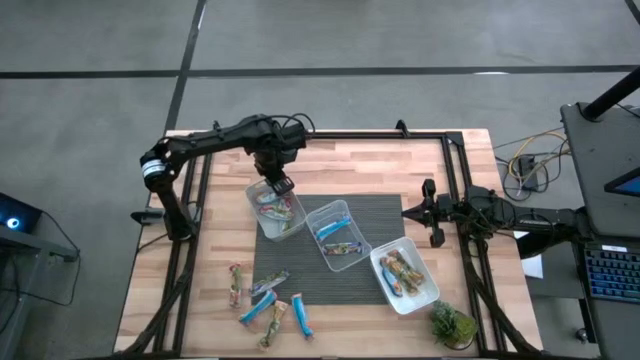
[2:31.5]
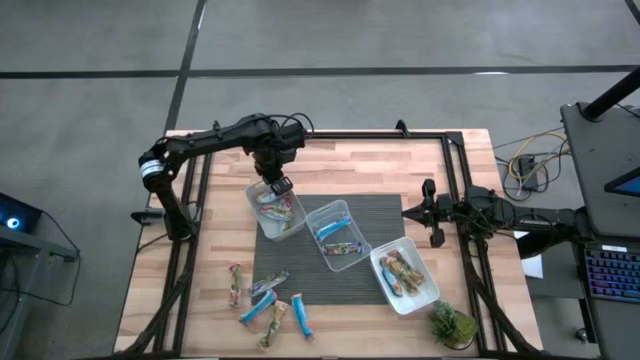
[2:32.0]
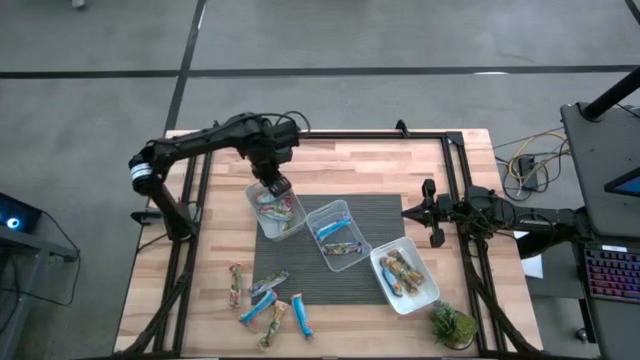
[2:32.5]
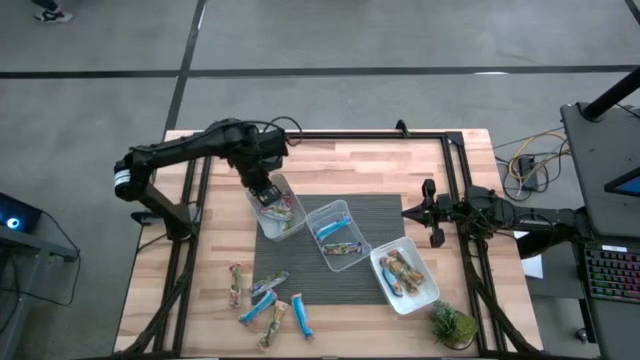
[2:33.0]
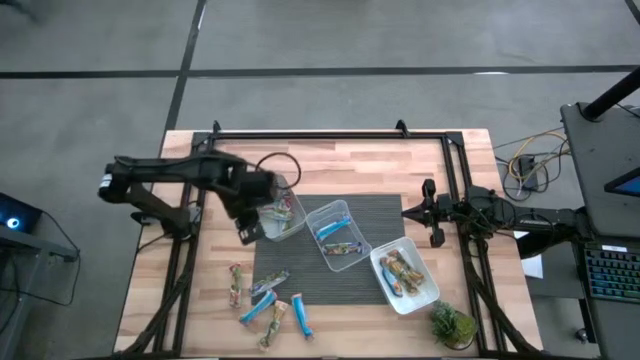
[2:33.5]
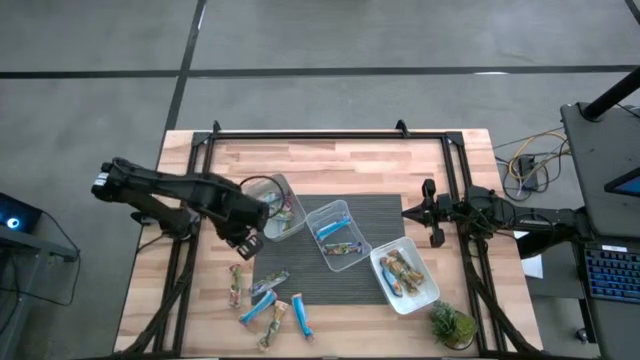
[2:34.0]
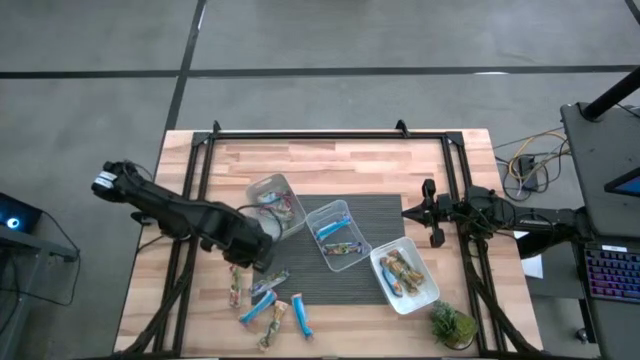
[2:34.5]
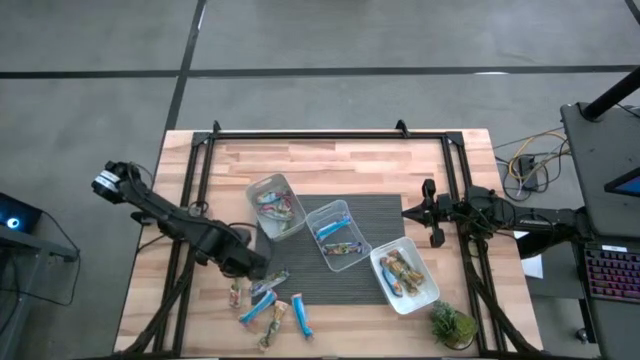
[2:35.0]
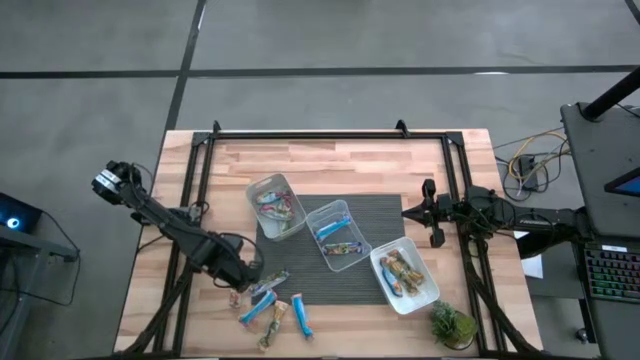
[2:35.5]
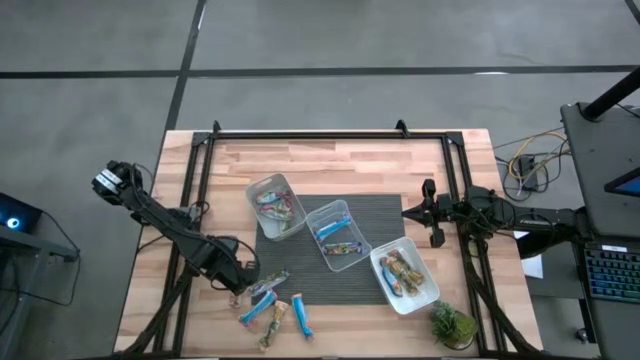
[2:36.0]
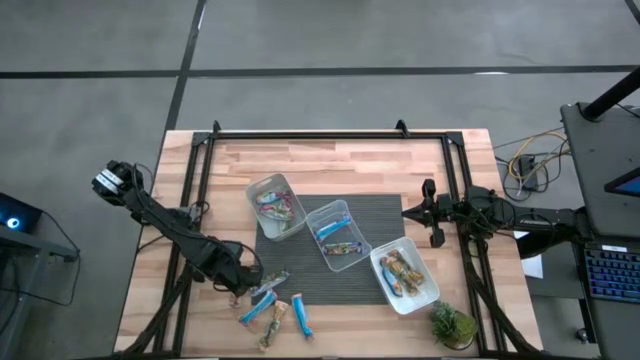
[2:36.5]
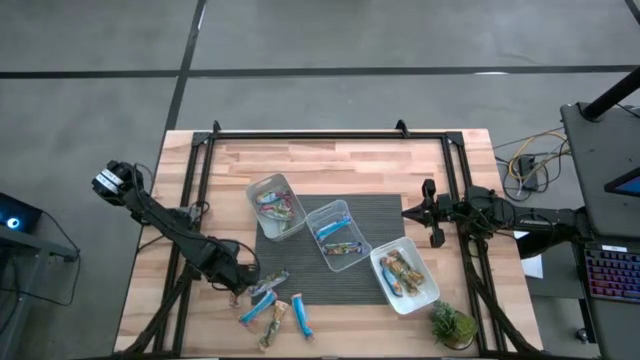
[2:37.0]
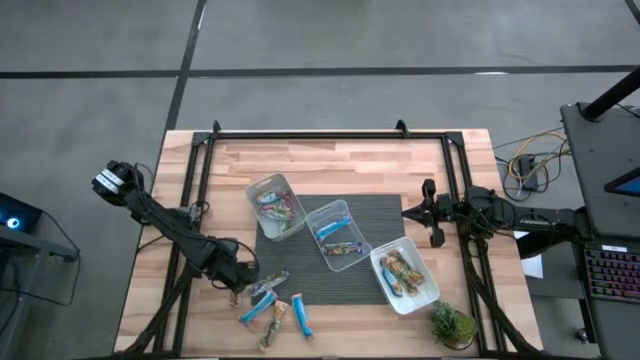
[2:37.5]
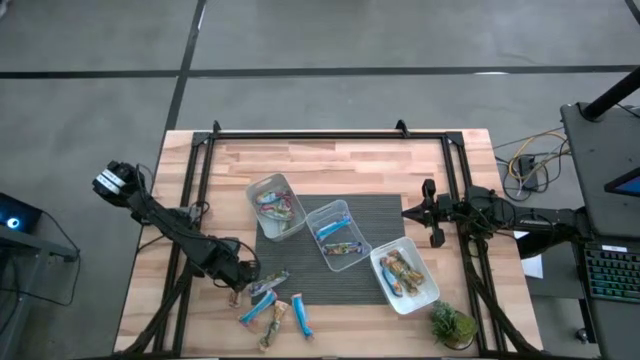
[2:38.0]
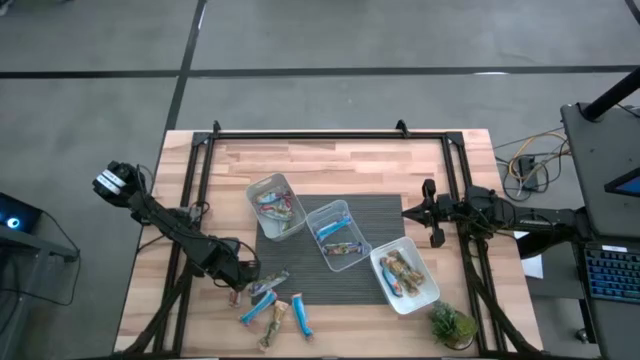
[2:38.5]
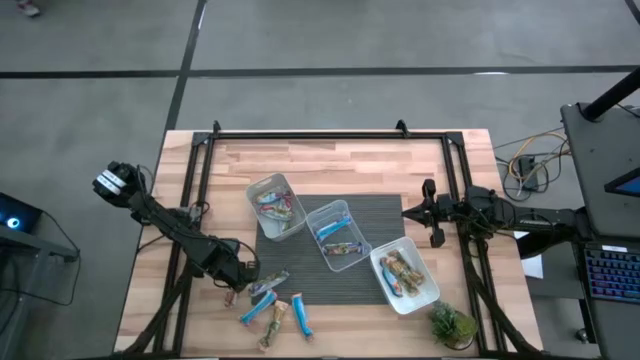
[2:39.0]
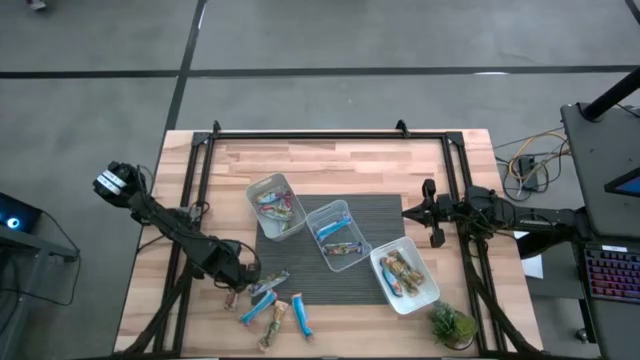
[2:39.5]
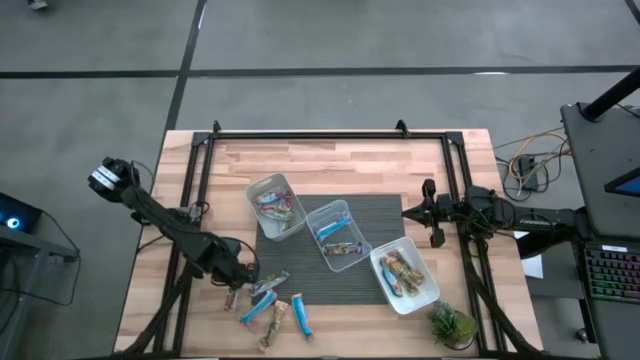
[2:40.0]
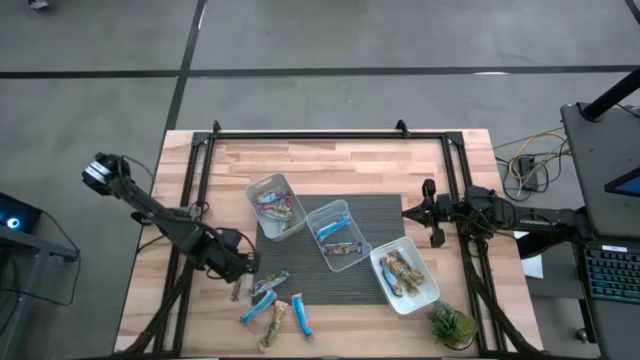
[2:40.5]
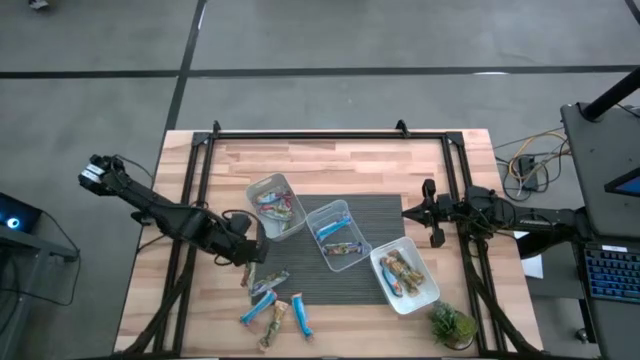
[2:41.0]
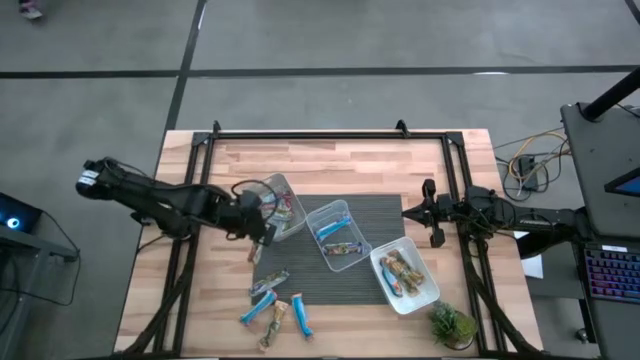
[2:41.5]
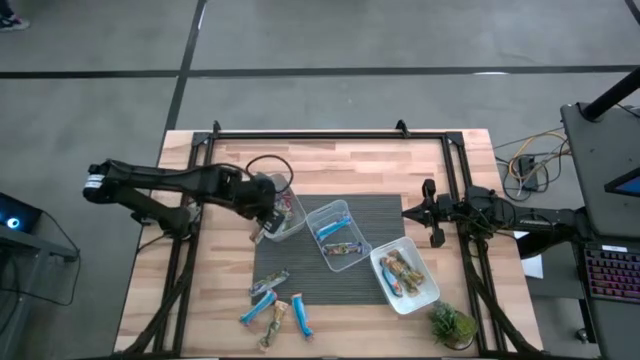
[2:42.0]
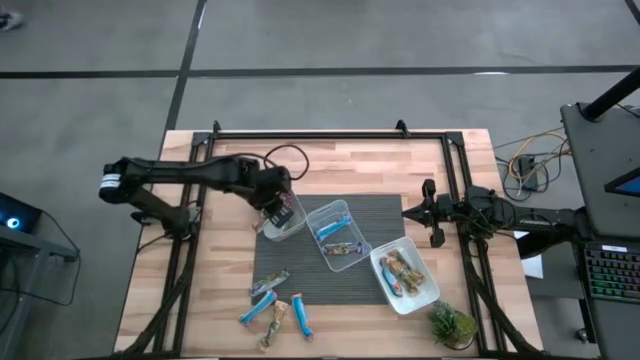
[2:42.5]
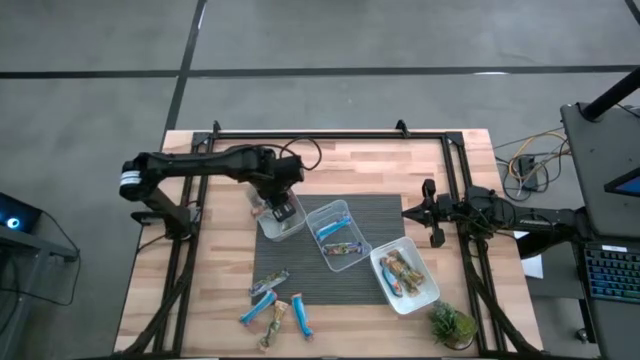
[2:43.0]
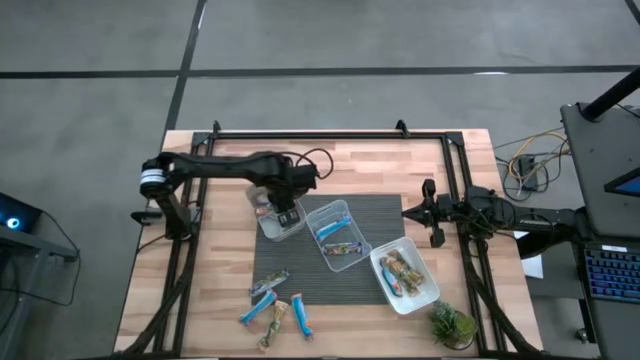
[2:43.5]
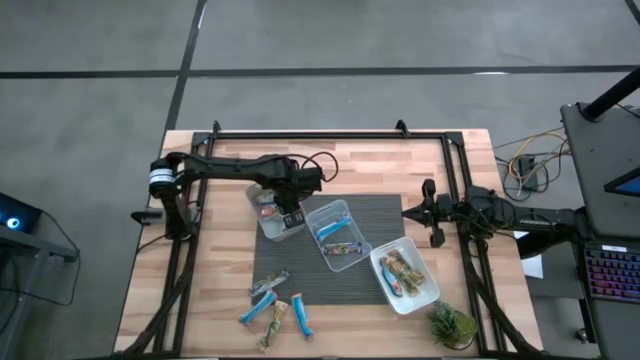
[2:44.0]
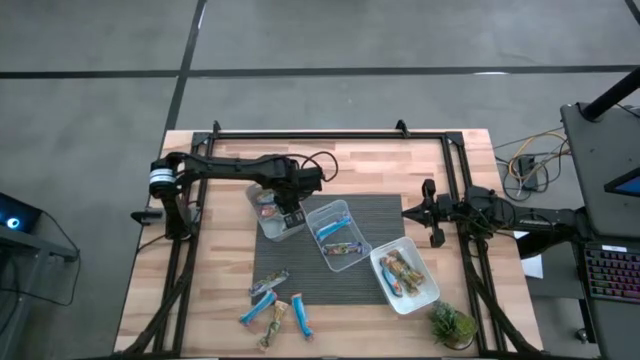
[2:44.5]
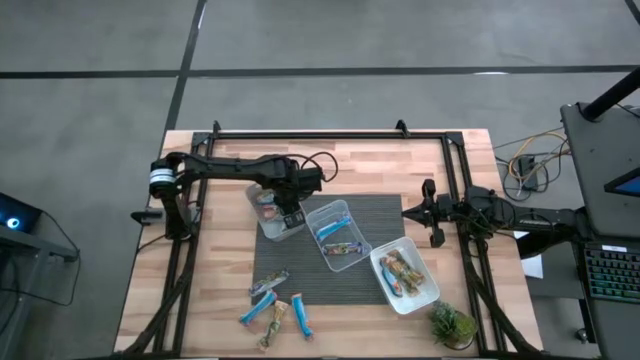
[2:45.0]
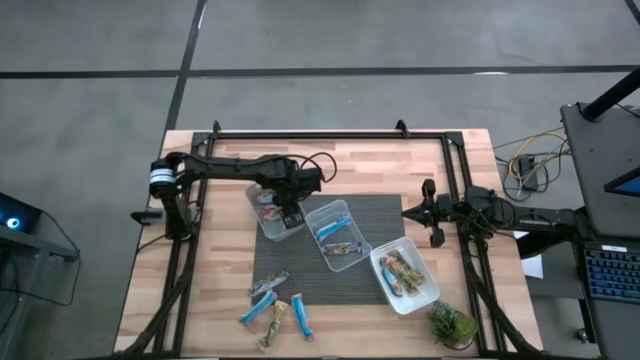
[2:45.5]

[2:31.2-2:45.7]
Task: Pick and place Granola Bars by type
Put the red granola bar into the gray bin

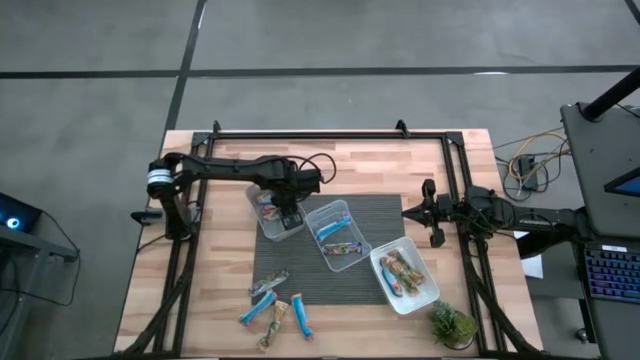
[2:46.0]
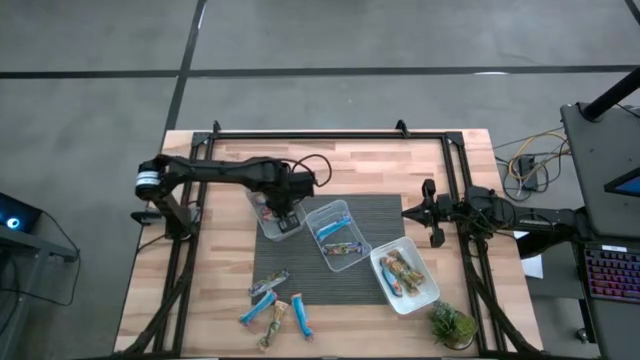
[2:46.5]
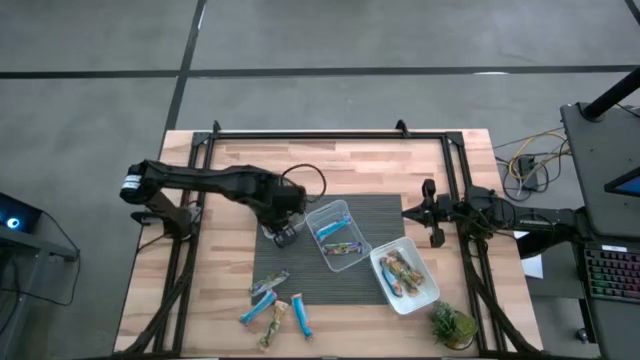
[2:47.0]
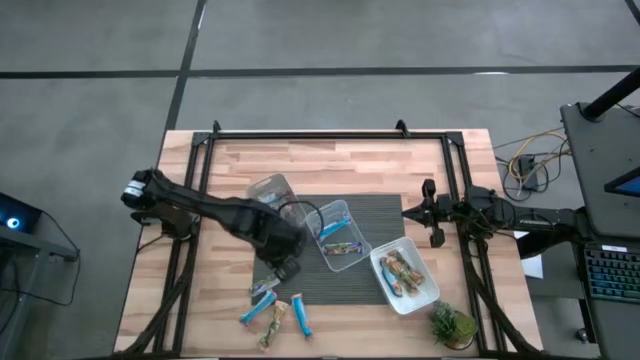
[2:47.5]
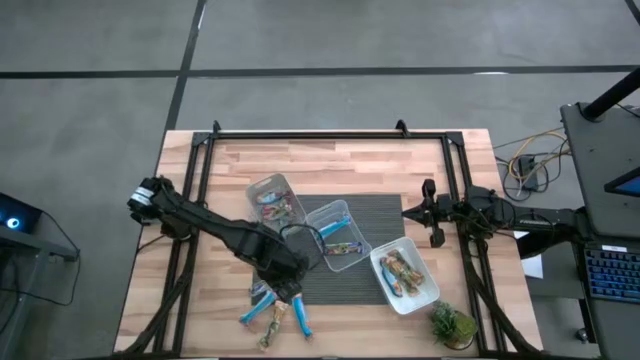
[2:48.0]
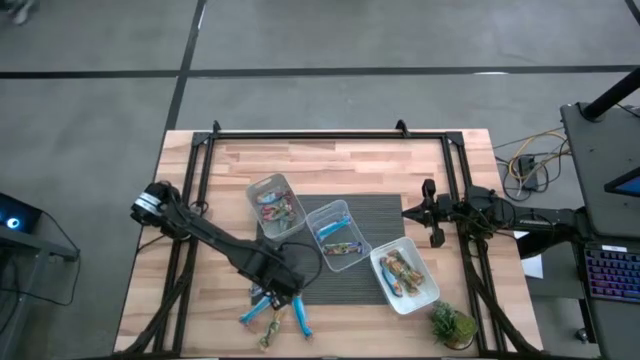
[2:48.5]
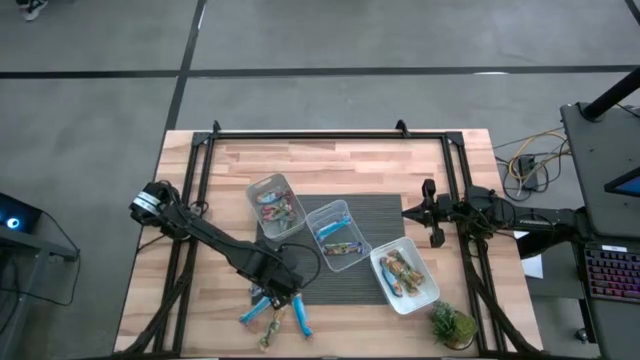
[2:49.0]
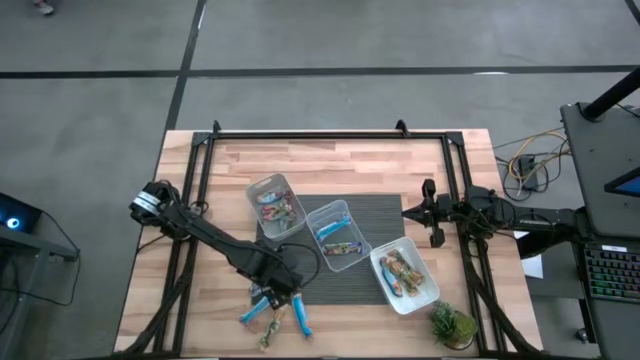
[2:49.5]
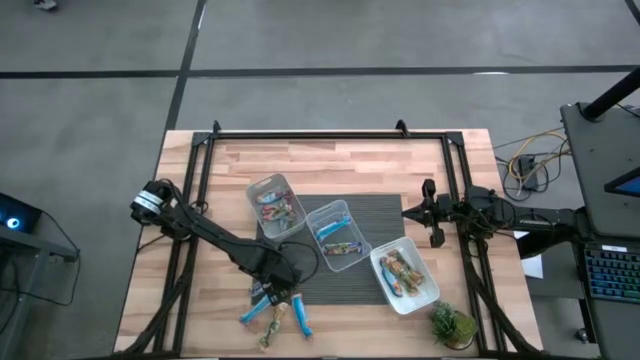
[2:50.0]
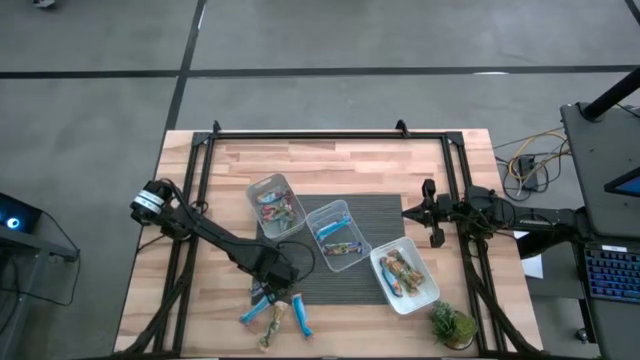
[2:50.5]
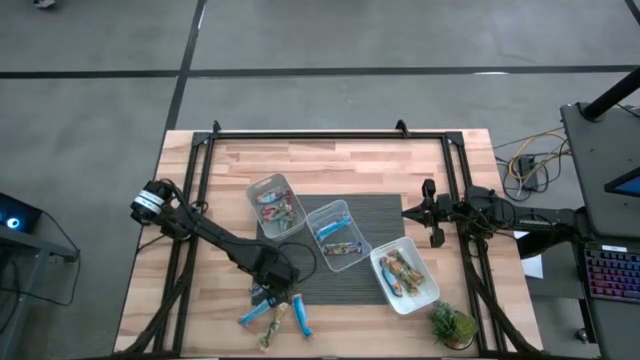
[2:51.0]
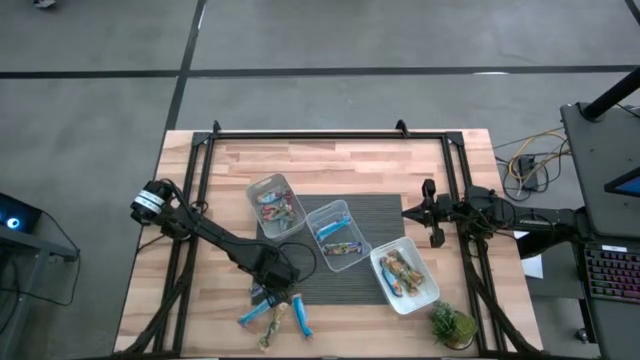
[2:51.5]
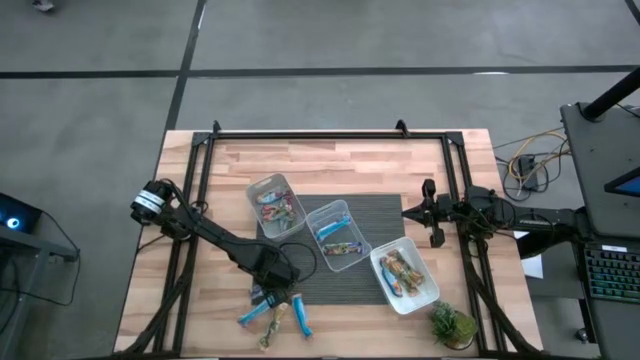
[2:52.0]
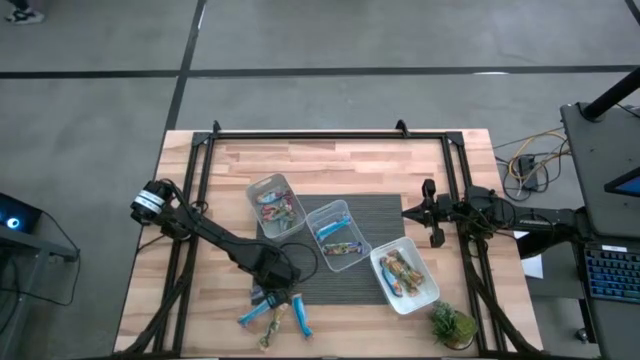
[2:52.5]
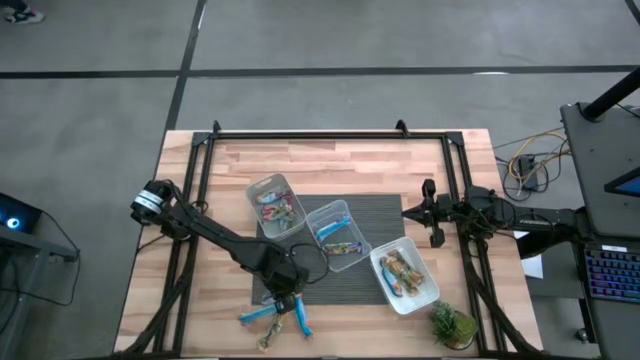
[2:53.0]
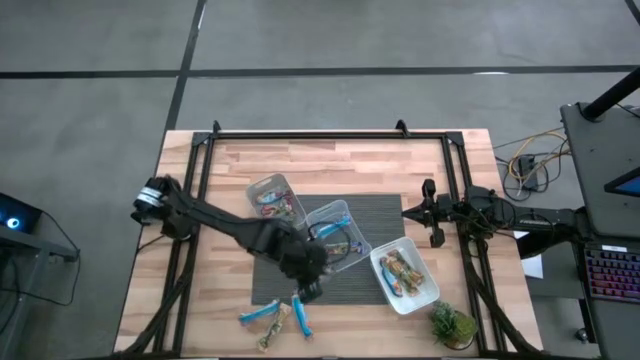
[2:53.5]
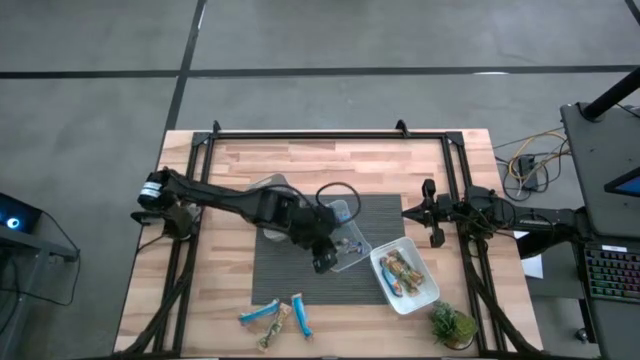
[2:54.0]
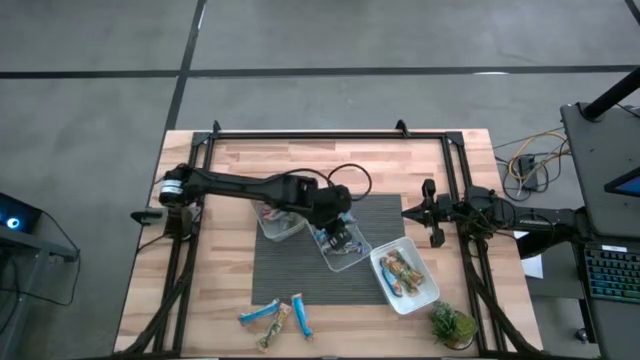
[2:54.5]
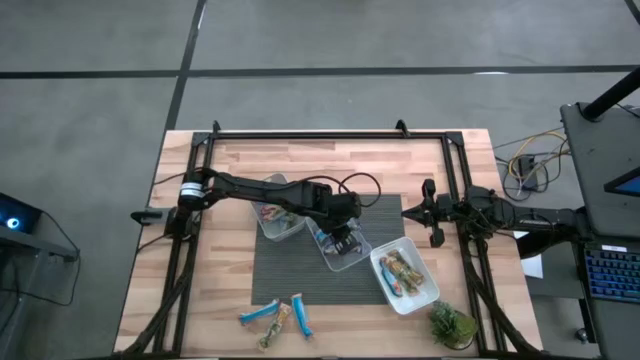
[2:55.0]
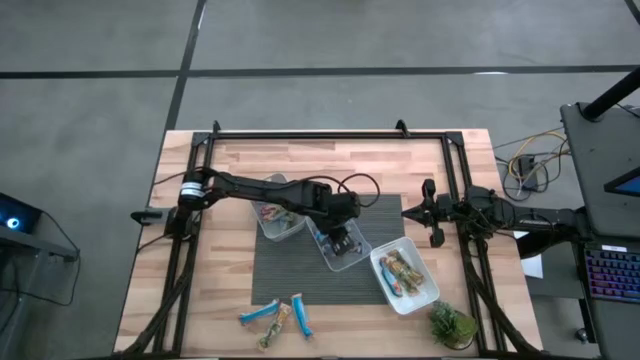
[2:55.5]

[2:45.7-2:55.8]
Put the blue granola bar into the transparent bin
